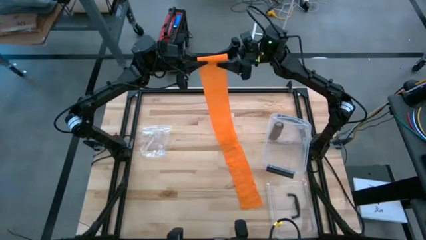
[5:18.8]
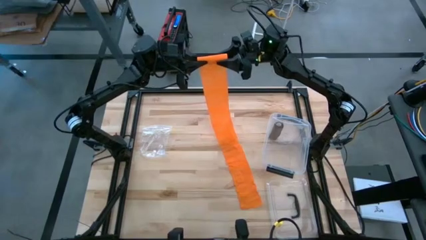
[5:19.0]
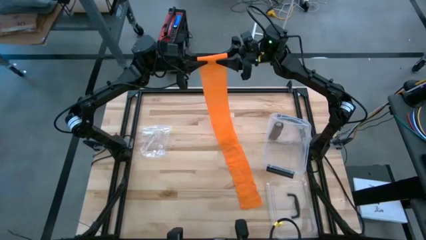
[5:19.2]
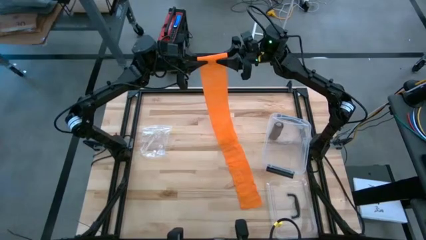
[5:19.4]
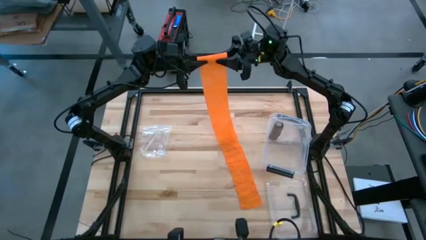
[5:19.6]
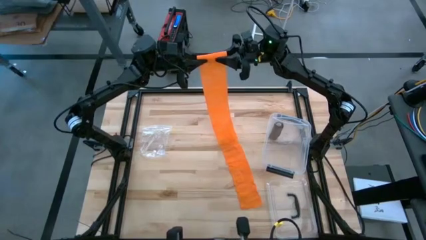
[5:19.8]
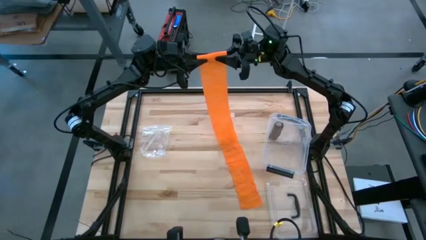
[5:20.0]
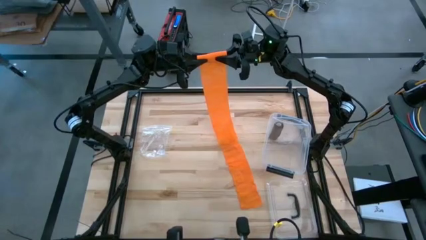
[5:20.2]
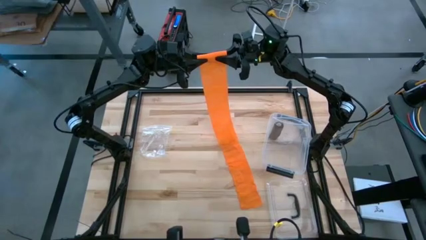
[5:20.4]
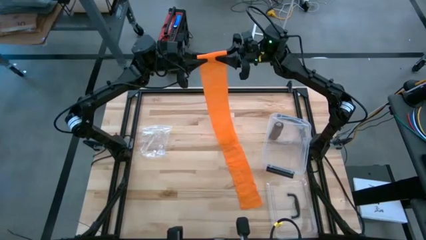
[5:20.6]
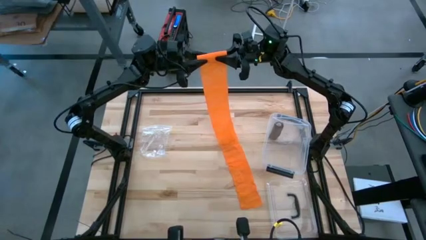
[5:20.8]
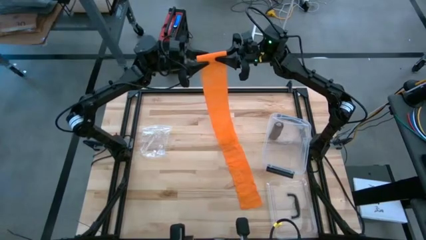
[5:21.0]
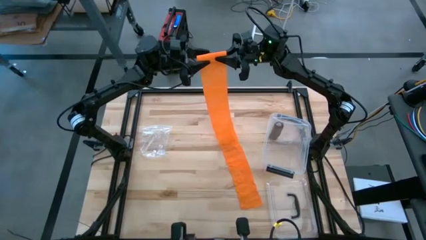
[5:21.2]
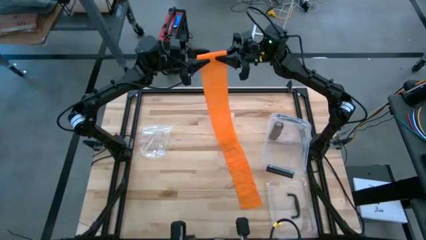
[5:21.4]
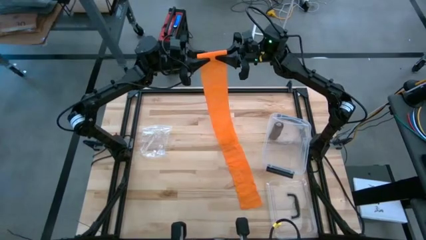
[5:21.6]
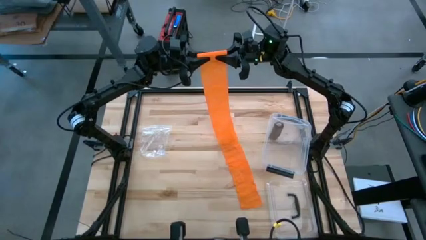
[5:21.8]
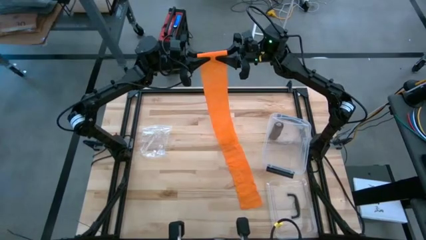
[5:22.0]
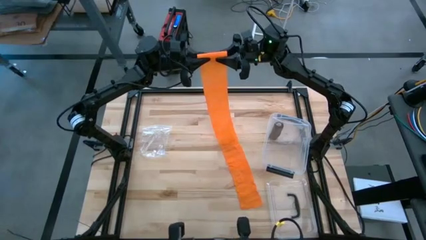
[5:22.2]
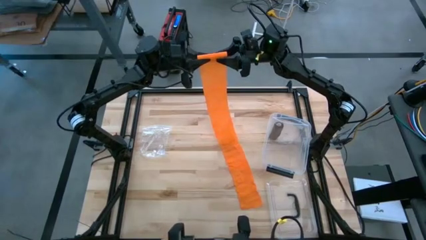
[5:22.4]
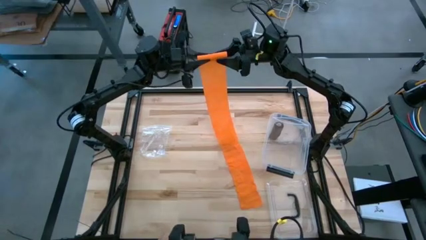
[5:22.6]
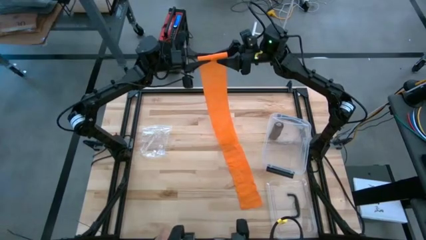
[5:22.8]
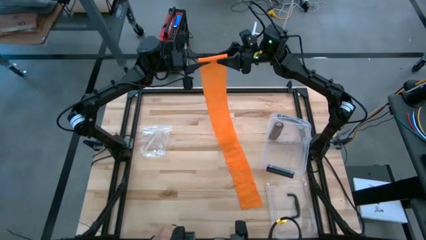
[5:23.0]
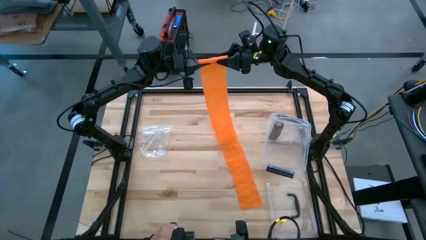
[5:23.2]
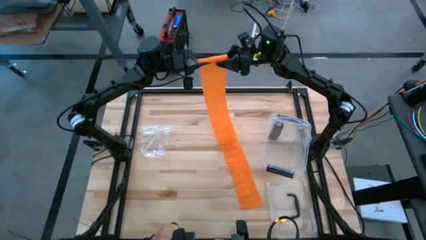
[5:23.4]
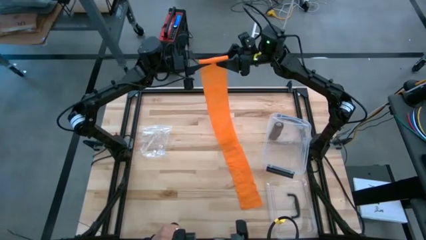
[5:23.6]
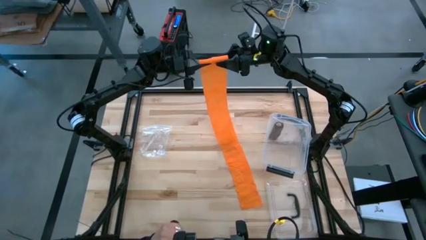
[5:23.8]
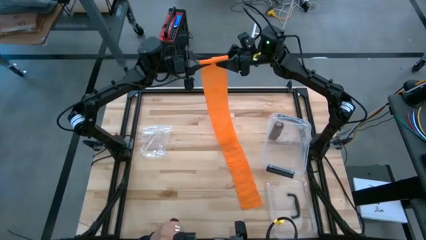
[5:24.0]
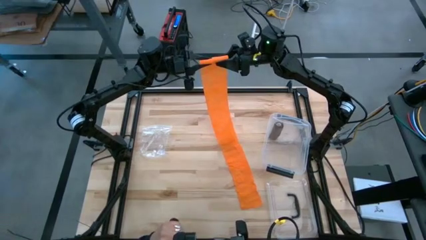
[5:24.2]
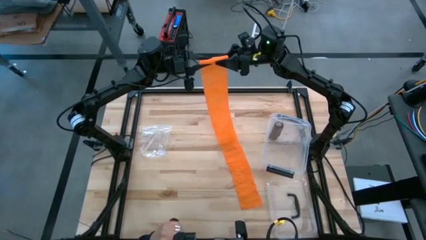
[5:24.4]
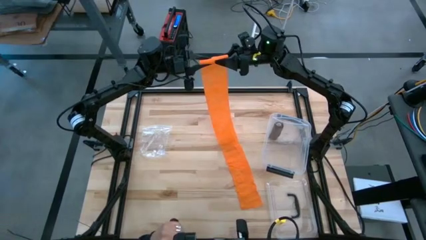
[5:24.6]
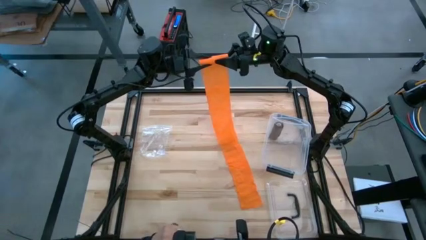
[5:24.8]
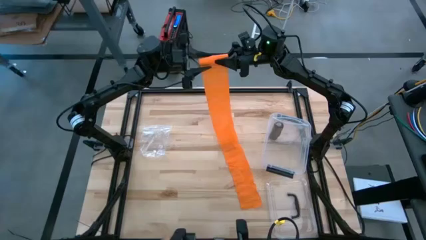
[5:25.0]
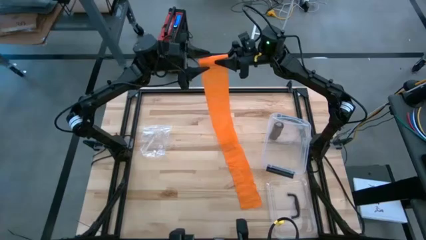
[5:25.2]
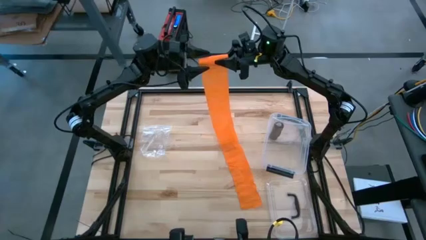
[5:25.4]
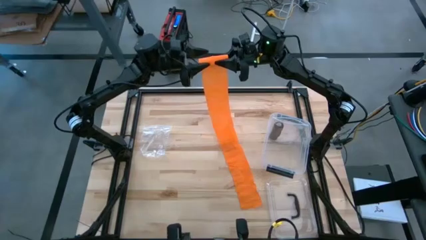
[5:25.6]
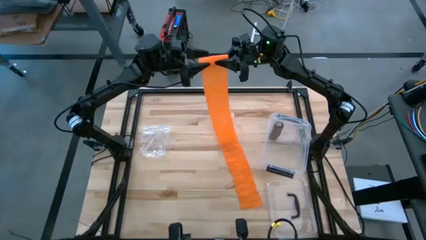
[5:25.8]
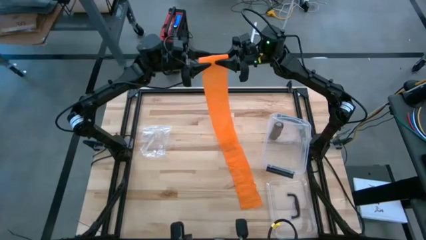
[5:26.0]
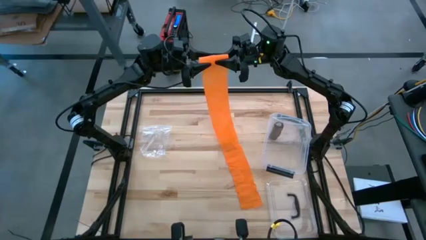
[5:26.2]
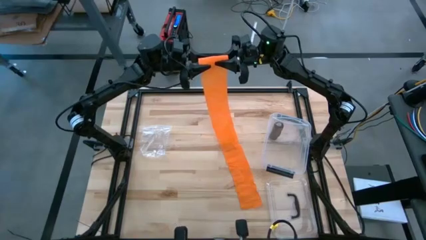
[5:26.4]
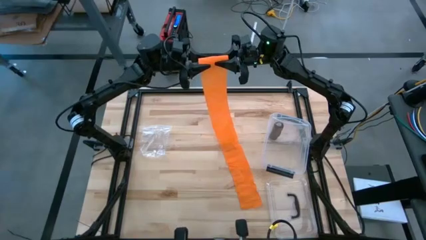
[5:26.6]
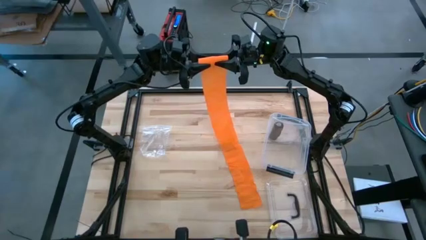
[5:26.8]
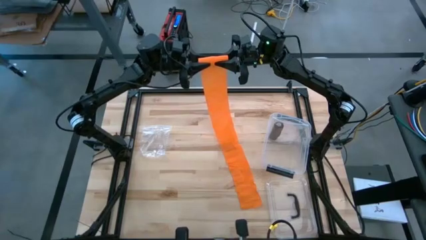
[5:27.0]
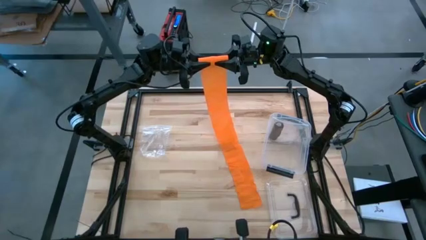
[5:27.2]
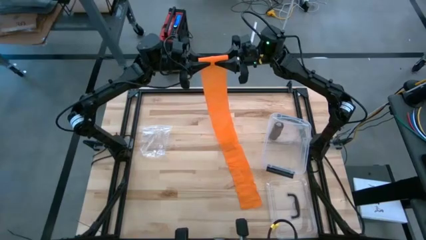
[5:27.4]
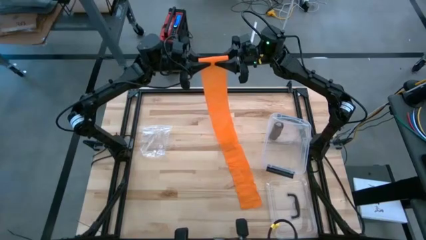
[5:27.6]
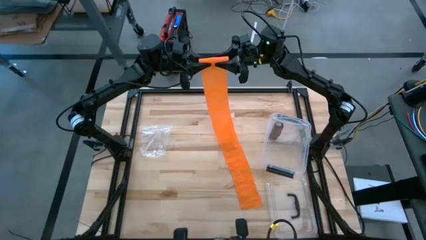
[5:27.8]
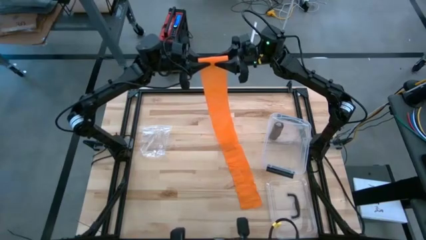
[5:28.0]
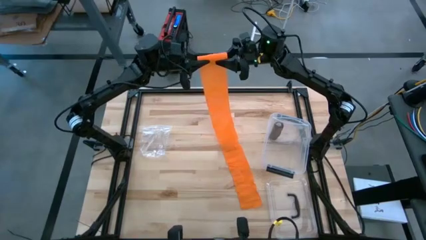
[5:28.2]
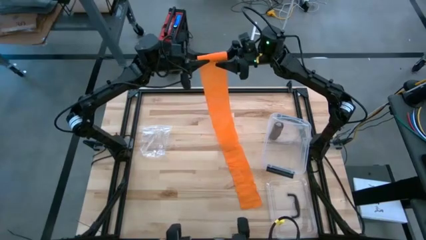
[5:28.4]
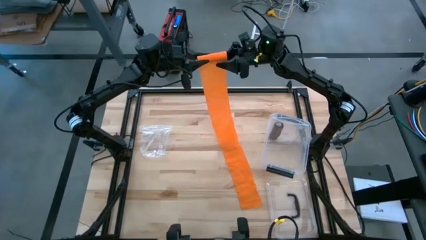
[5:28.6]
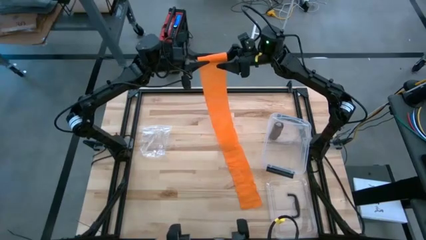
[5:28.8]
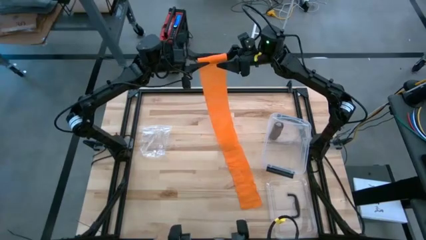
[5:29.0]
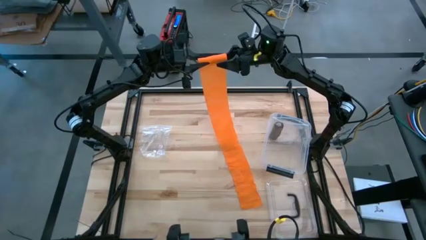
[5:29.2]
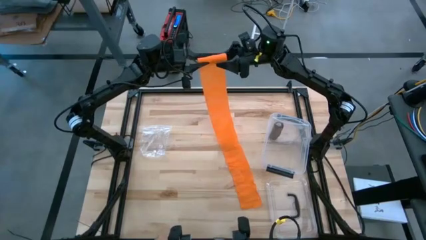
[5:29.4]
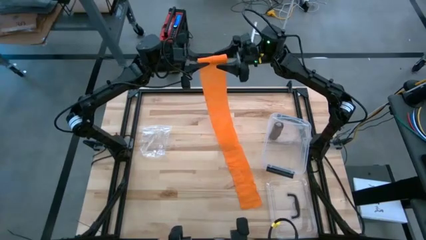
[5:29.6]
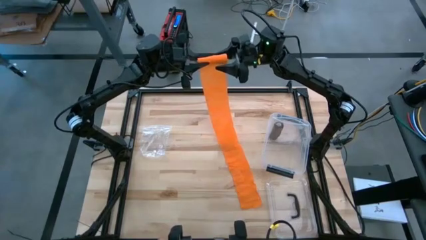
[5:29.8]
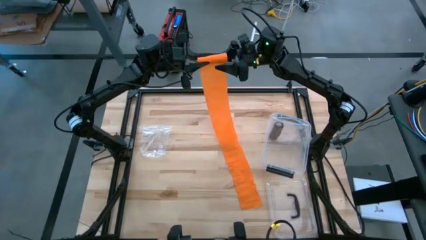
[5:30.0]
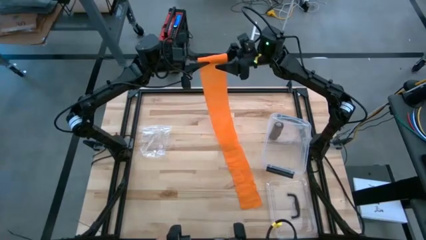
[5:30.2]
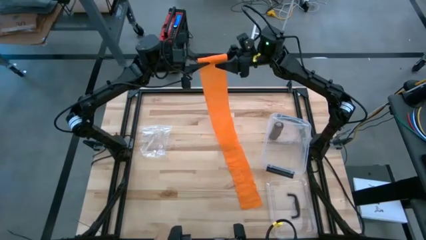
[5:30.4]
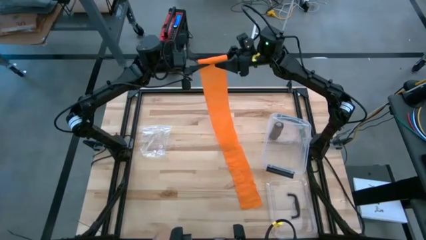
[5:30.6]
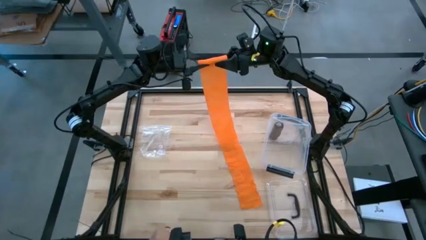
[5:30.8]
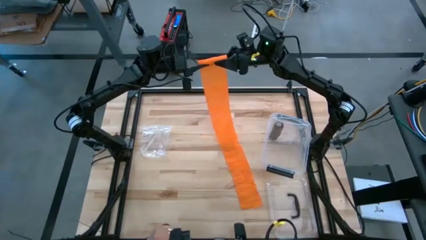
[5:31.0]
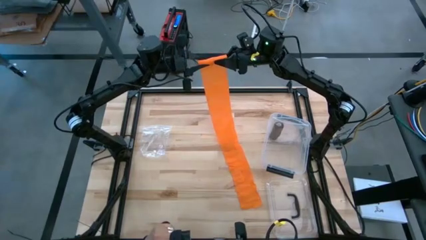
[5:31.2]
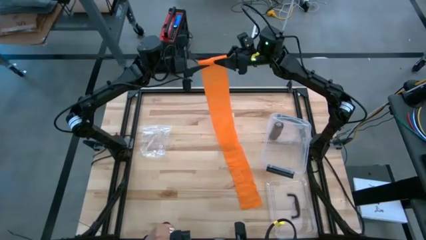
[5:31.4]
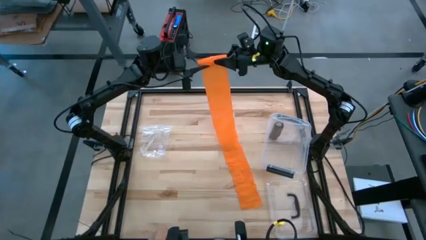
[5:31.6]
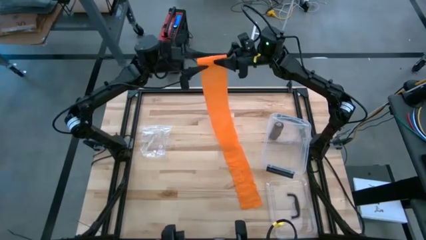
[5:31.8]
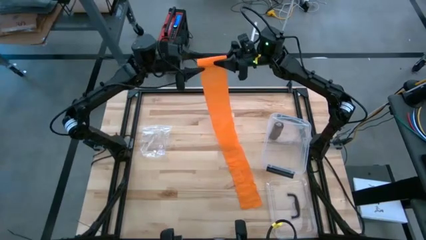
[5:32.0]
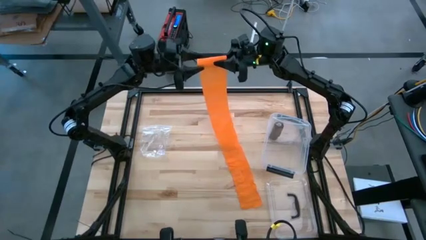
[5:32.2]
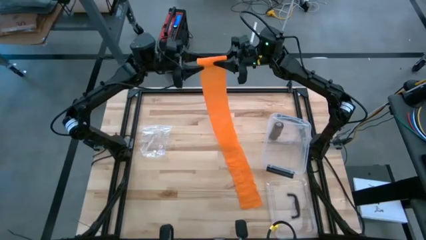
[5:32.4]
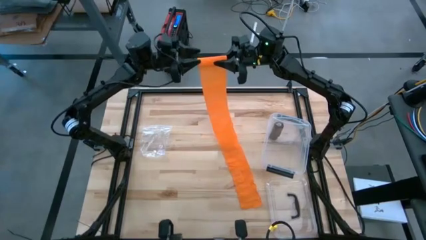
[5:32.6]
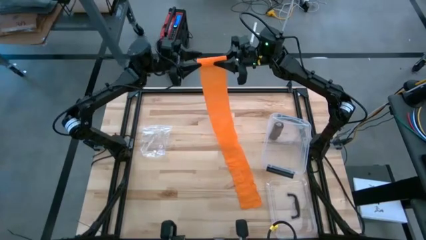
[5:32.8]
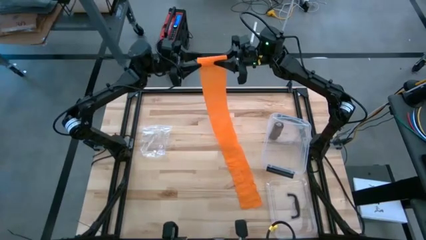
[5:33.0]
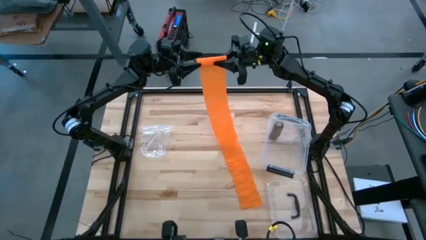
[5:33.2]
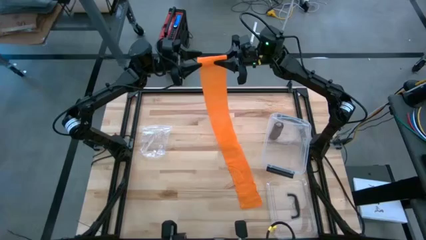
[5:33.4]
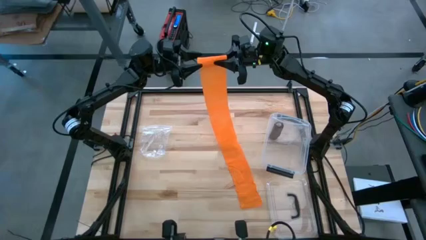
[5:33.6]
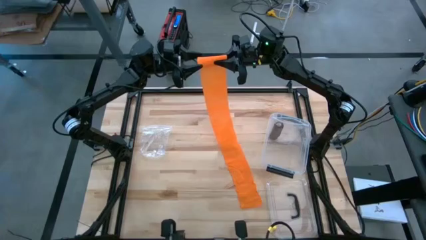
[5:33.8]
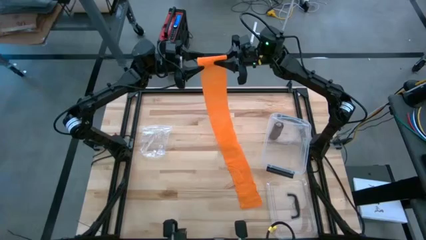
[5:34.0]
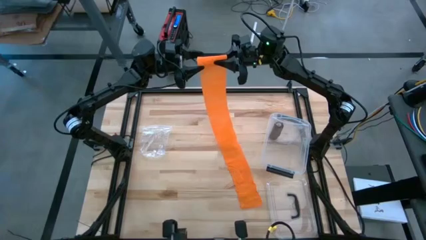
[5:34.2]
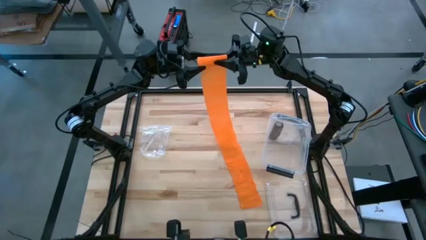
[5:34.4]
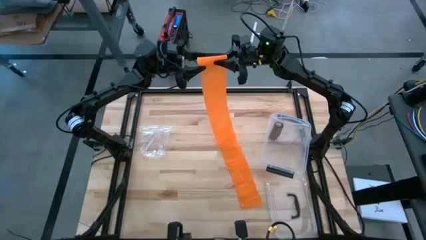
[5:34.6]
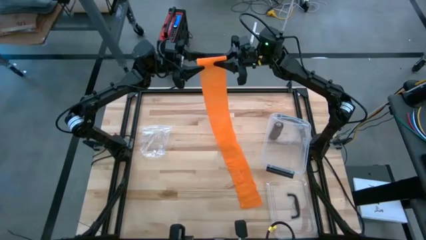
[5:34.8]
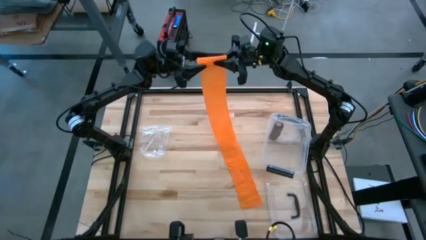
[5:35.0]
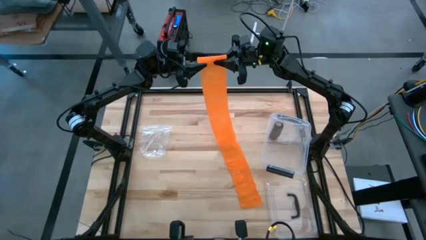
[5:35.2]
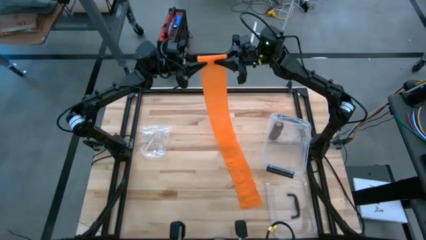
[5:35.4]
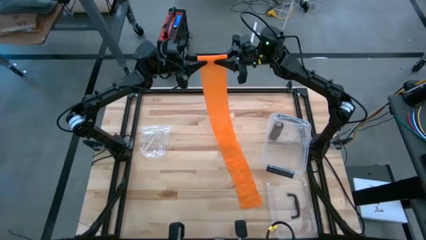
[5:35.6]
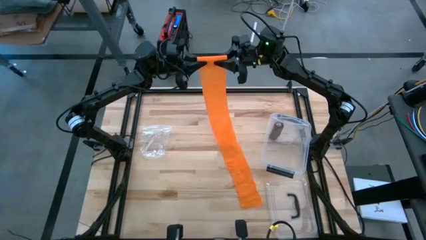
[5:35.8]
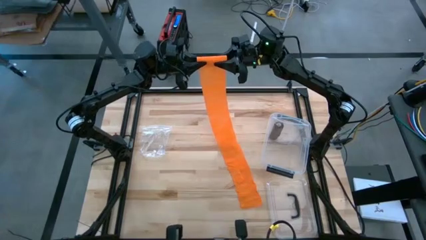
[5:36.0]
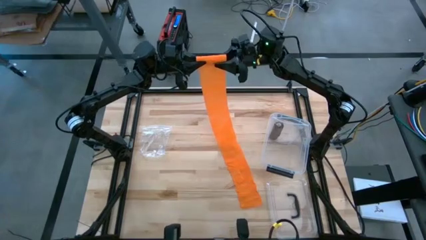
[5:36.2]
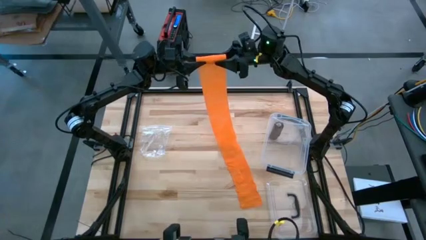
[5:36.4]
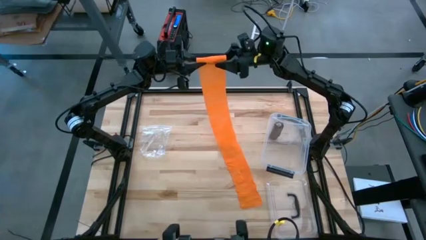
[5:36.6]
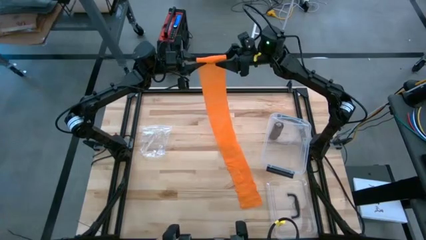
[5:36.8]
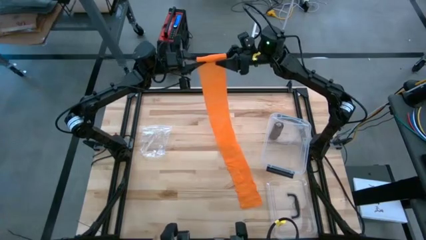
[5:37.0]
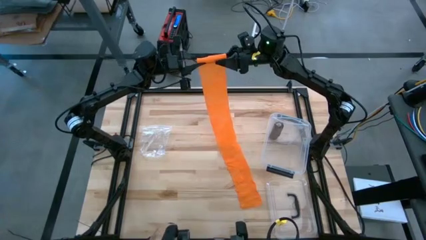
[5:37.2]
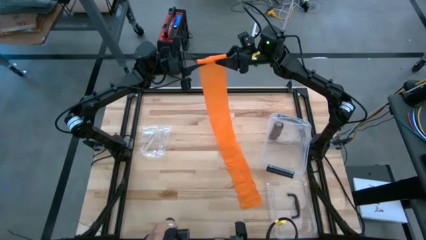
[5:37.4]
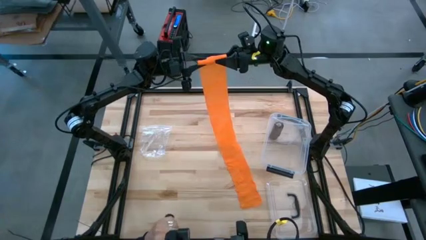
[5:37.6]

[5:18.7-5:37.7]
Task: Roll bandage
Roll the orange bandage
